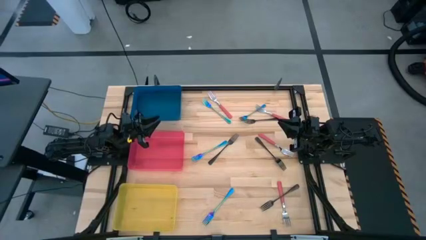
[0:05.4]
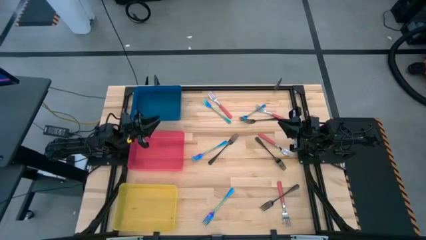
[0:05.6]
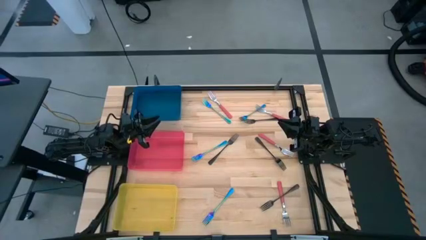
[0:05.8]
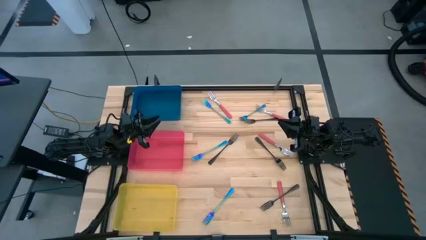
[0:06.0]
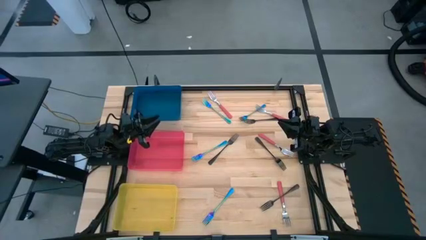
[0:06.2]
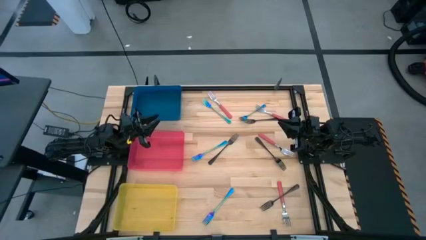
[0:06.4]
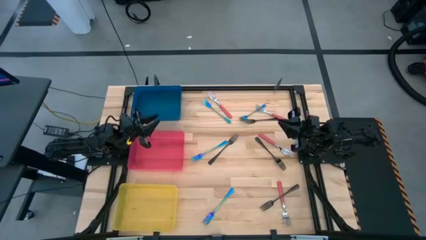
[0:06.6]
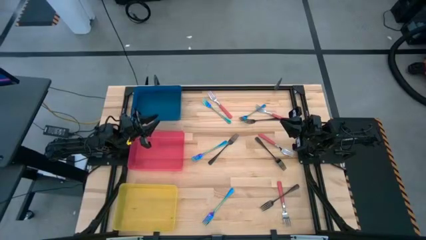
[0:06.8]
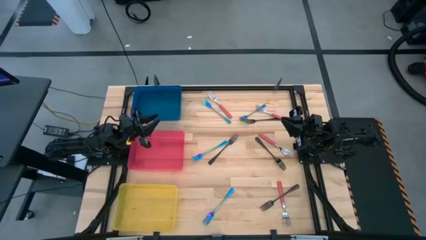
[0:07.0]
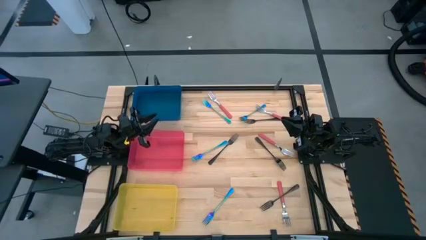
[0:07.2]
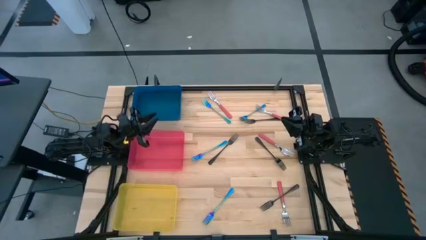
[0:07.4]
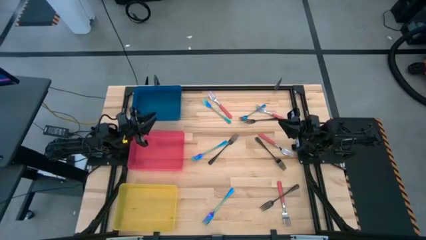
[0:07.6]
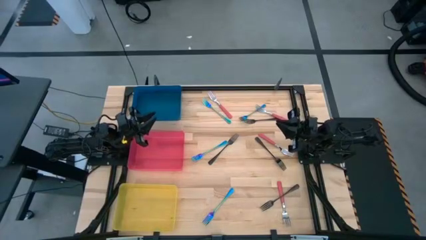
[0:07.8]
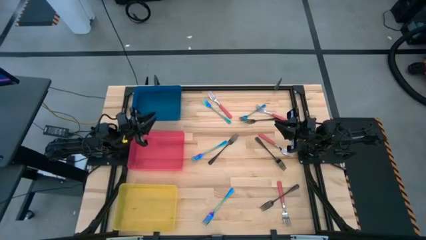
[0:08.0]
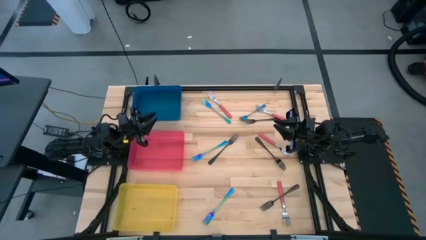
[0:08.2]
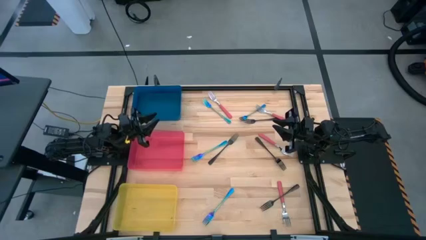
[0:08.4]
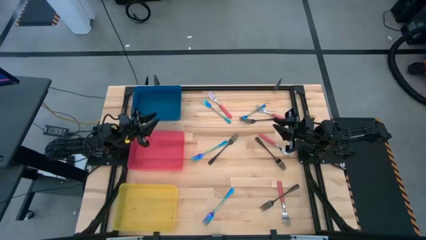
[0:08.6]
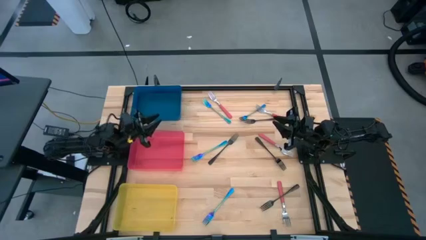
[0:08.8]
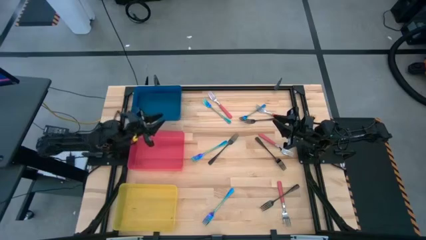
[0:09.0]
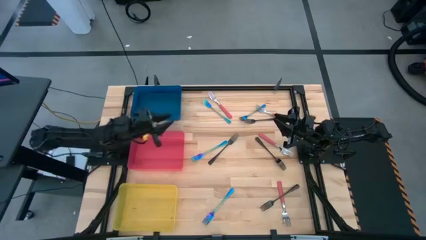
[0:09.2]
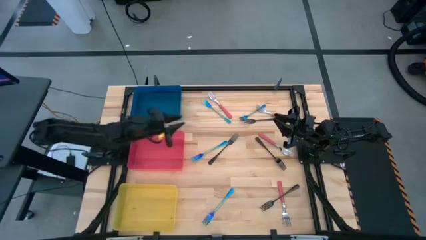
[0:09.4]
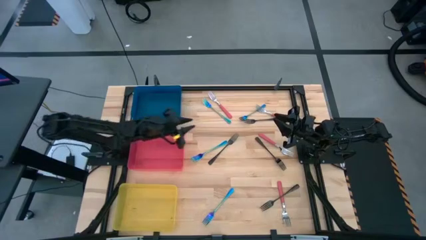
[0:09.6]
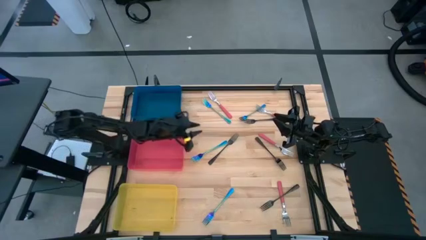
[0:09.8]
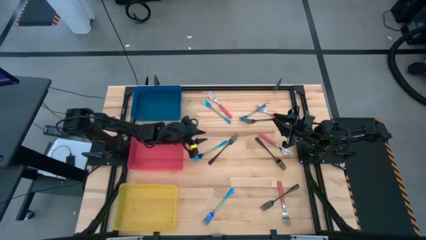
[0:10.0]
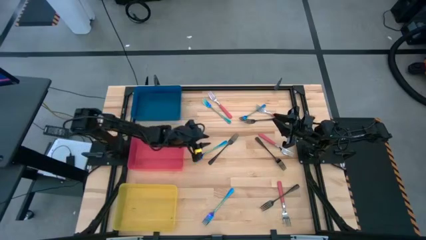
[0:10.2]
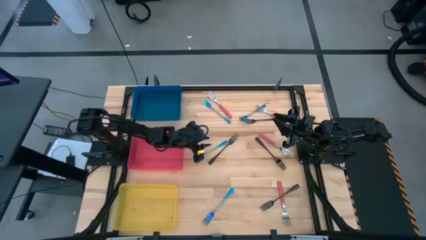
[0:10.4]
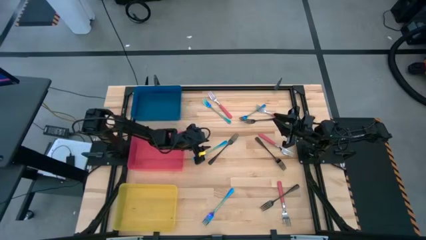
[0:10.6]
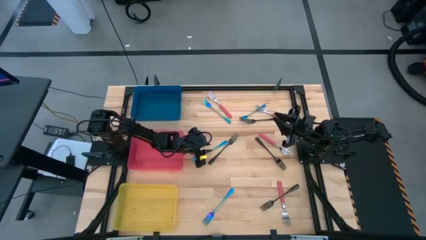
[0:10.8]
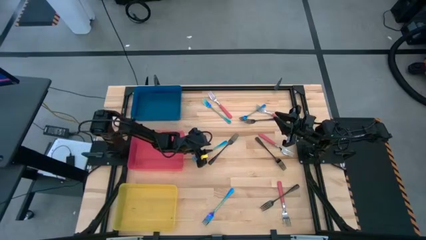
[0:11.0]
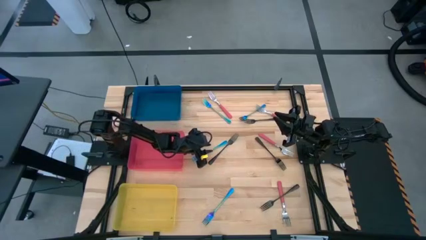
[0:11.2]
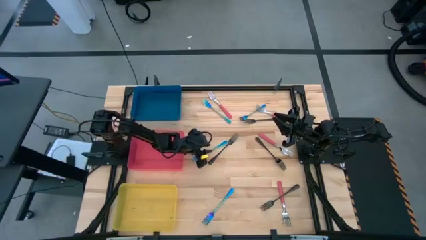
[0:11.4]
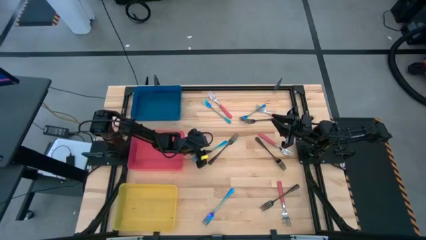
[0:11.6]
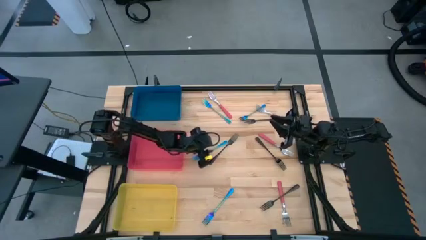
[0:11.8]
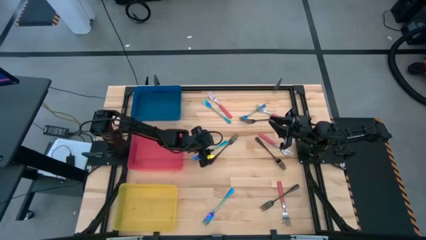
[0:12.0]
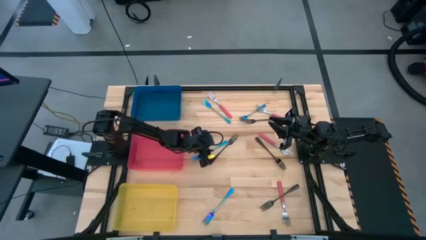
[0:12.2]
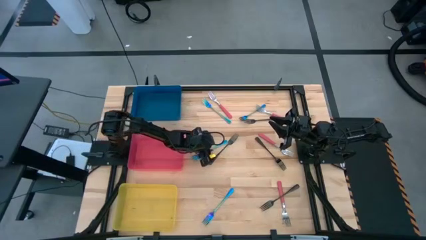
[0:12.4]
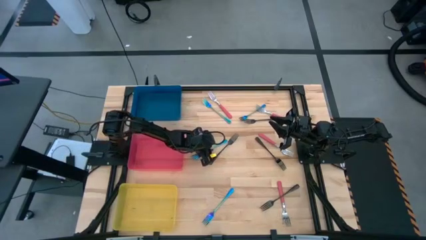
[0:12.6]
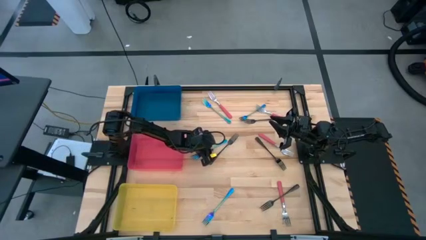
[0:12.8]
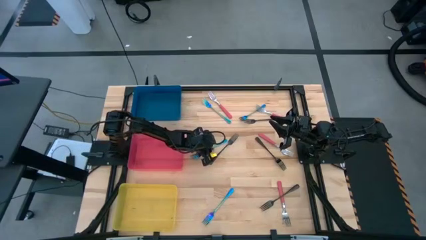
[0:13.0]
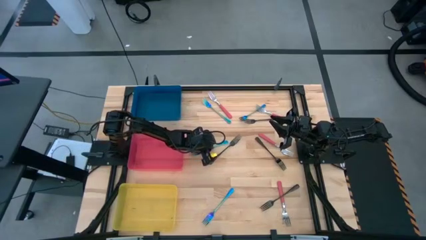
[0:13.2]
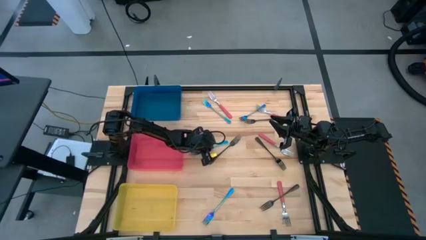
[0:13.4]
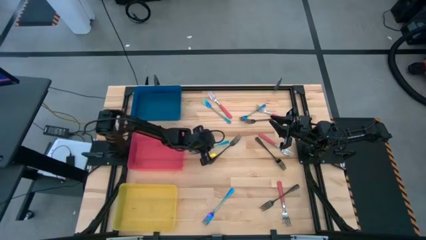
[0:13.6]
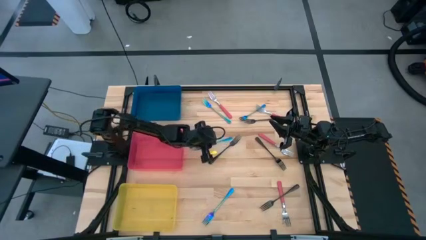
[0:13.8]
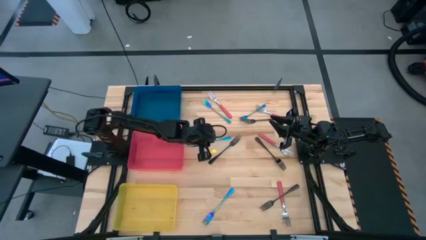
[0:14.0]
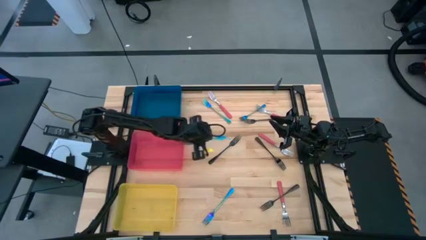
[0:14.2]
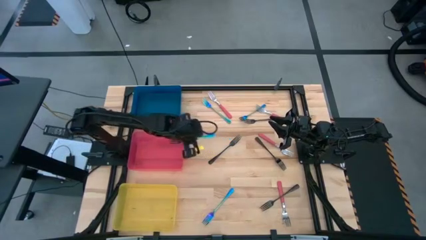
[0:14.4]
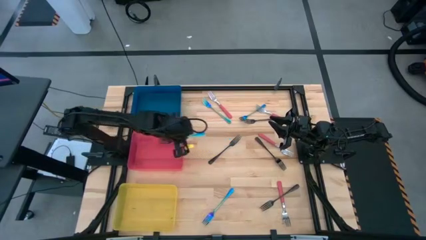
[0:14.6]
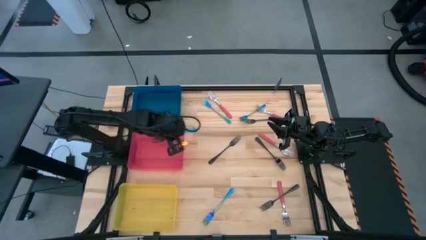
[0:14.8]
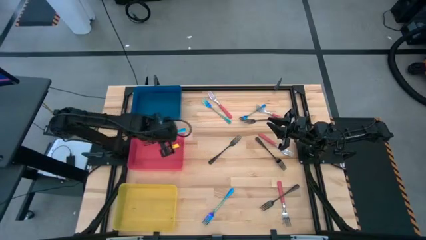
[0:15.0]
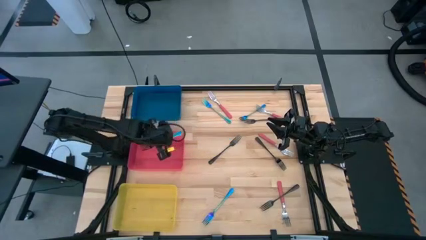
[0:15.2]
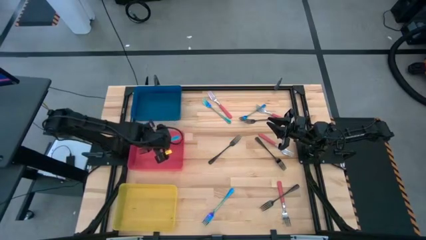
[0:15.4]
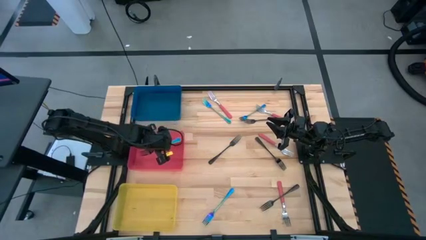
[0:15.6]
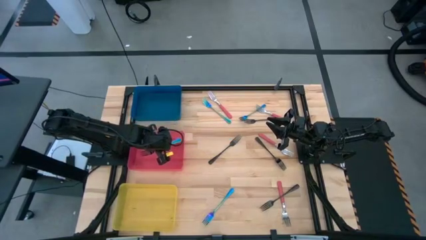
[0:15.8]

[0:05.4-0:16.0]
Task: Sort silverware by color (type)
Put the blue fork into the pink bin

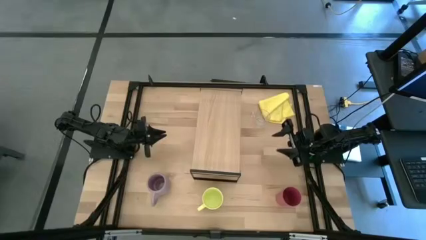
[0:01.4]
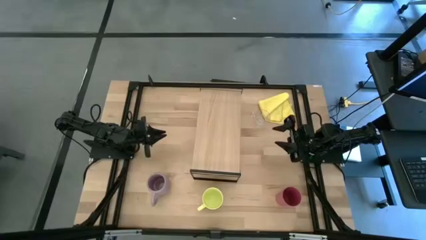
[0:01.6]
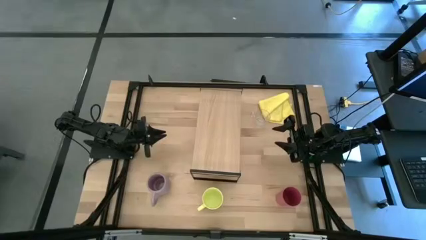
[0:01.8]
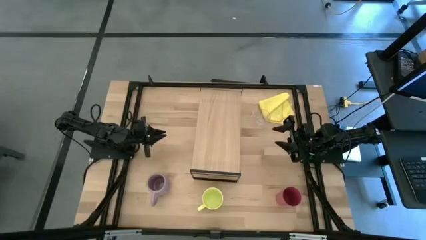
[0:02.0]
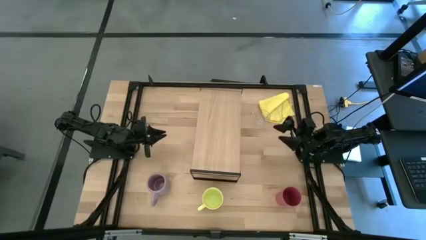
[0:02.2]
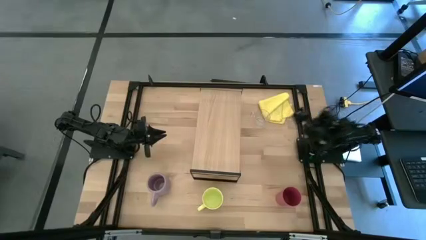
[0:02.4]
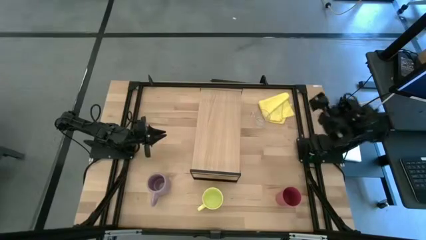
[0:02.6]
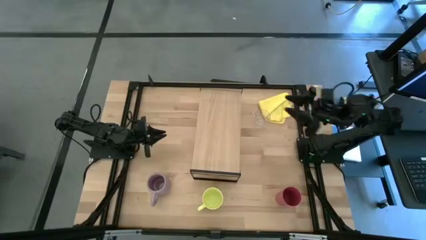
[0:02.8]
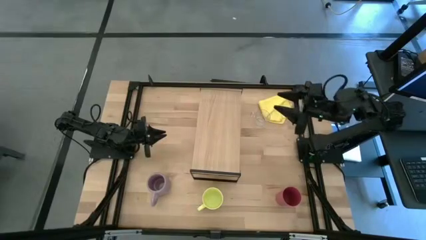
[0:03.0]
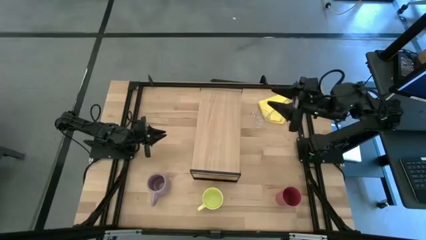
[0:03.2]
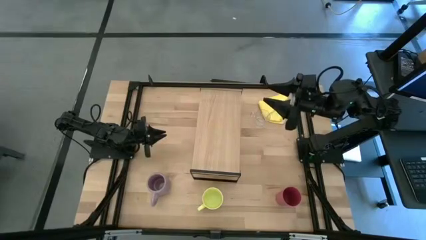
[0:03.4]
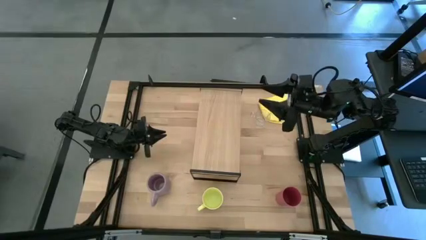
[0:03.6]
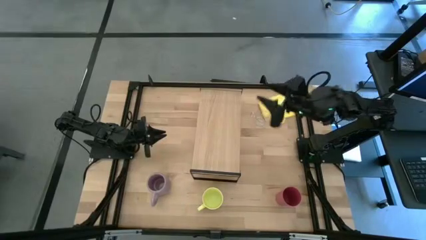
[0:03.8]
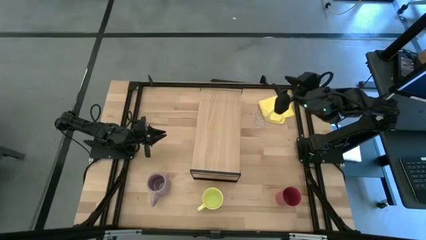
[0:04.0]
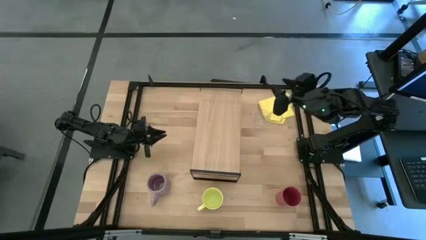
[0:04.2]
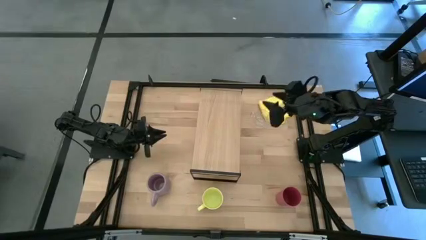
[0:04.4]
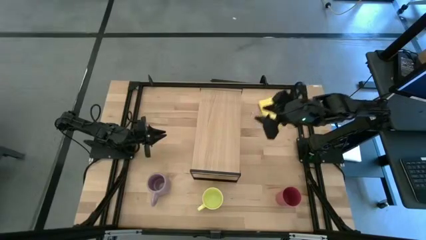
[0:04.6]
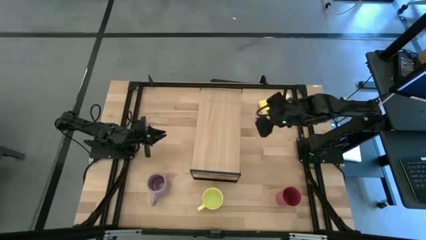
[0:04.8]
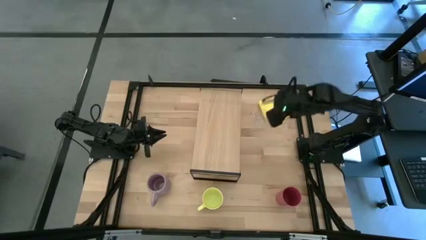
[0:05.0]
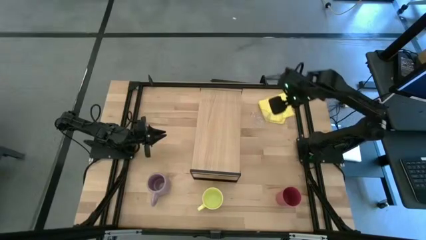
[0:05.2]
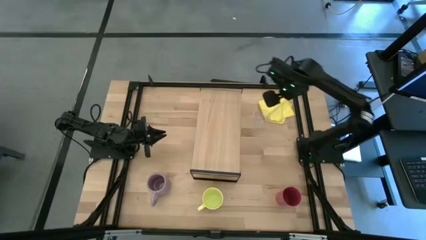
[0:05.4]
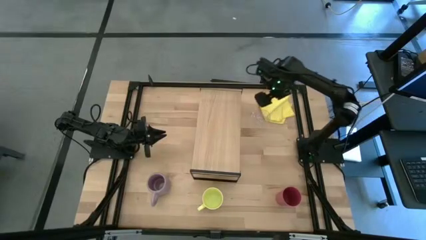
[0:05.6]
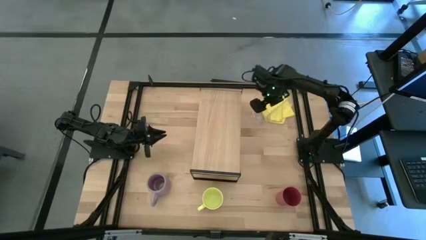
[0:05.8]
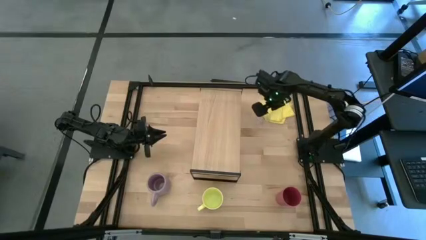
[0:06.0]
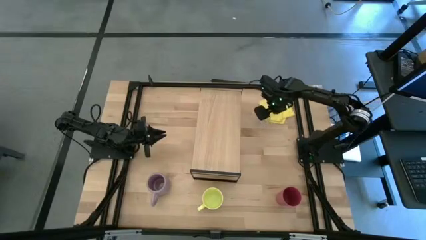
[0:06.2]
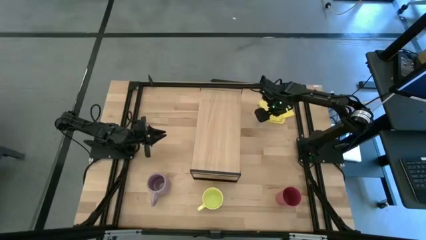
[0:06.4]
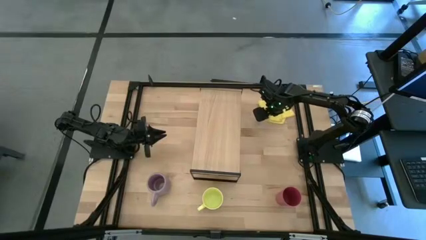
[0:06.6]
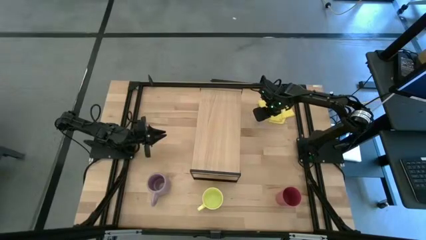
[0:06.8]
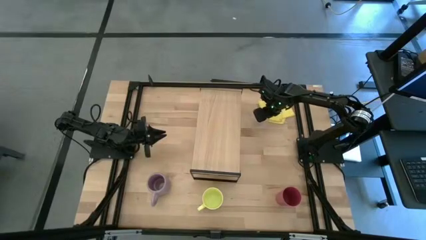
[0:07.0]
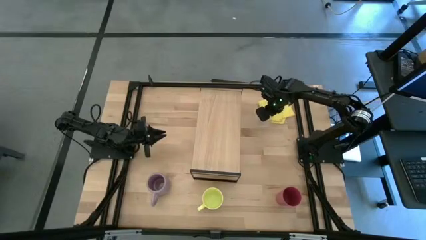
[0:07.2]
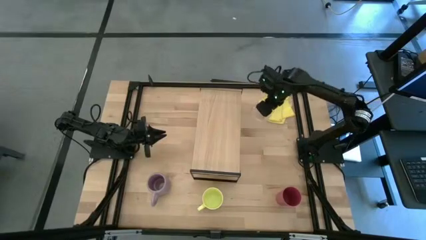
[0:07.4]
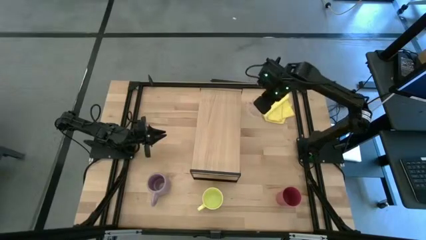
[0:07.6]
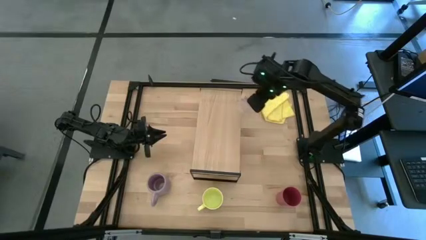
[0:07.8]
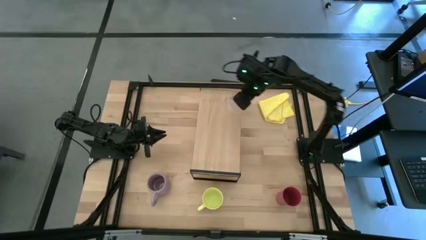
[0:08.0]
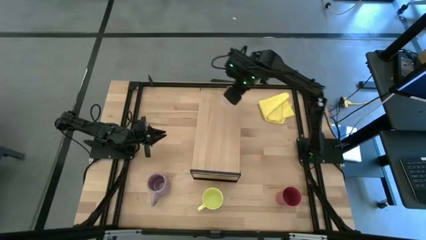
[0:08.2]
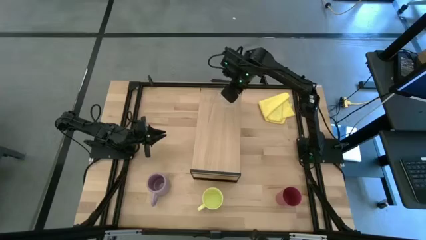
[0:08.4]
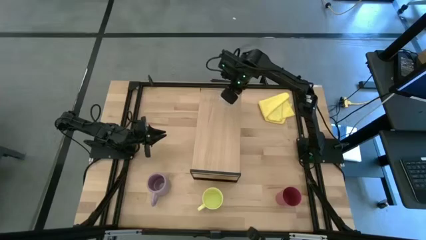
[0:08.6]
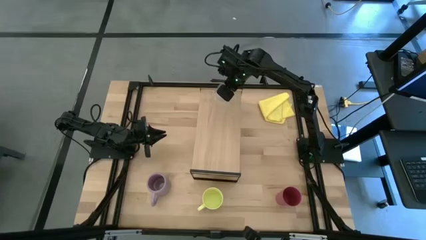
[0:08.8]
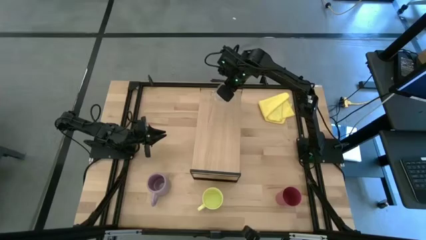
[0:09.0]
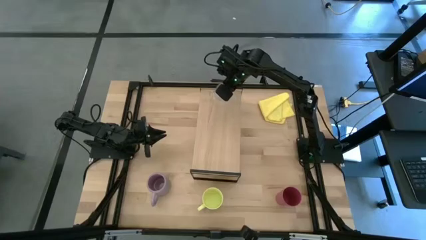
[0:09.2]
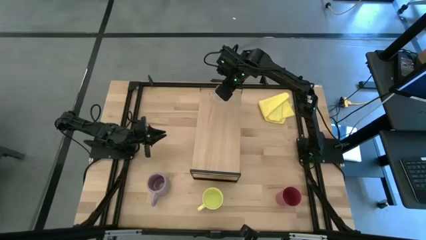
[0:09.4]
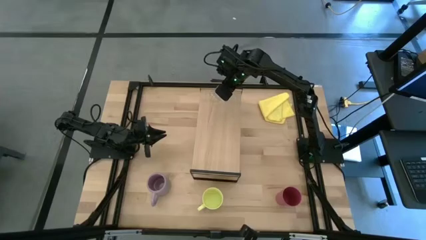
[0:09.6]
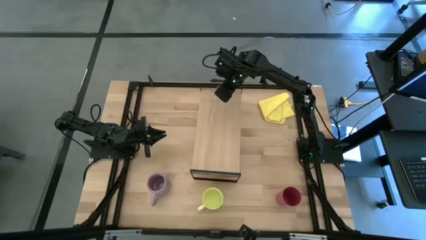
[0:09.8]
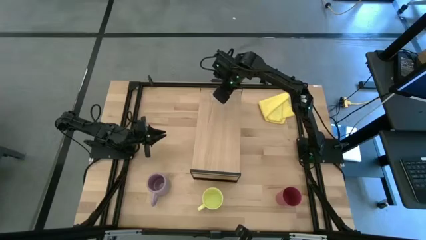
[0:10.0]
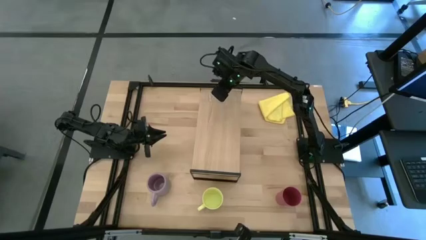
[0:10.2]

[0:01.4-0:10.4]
Task: Stack small to large cups/mugs on shelf
Put the transparent mug on the shelf
